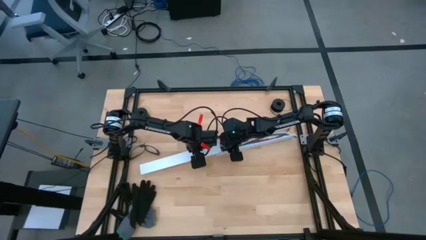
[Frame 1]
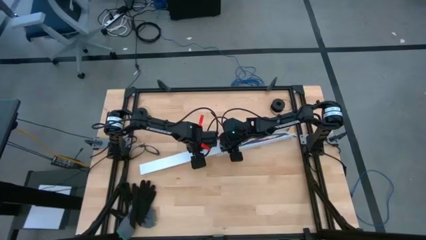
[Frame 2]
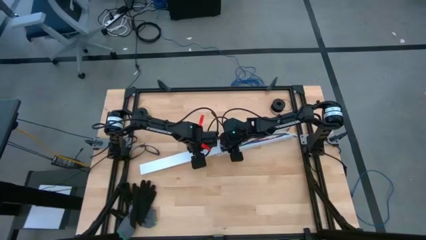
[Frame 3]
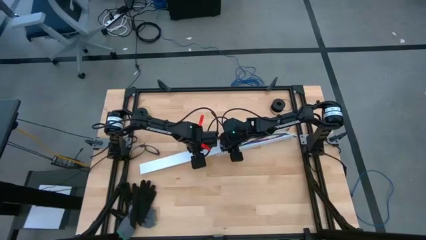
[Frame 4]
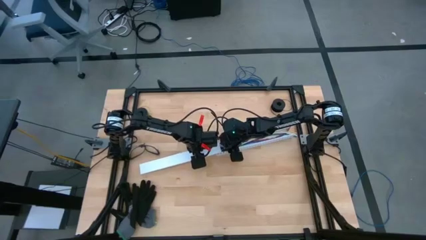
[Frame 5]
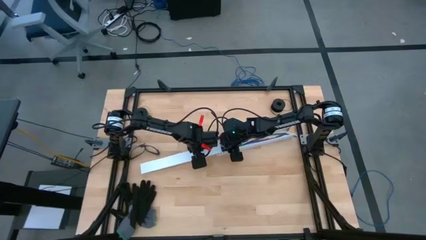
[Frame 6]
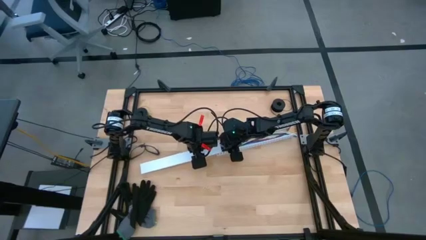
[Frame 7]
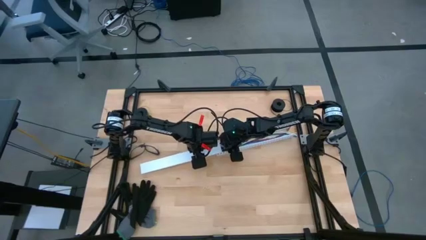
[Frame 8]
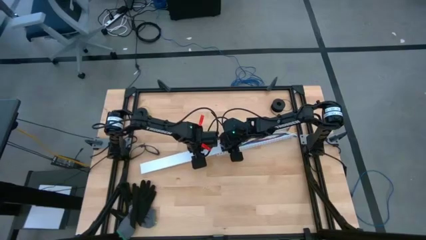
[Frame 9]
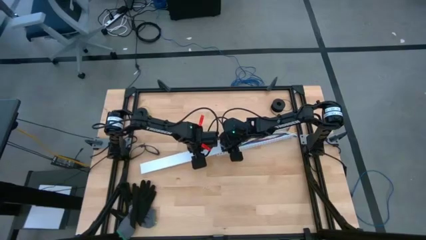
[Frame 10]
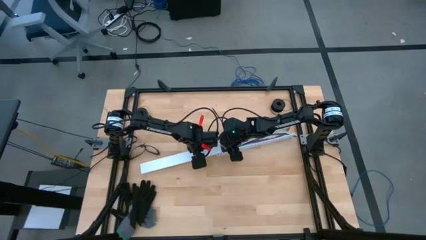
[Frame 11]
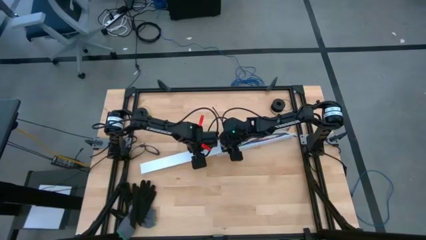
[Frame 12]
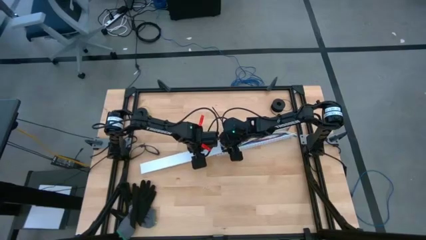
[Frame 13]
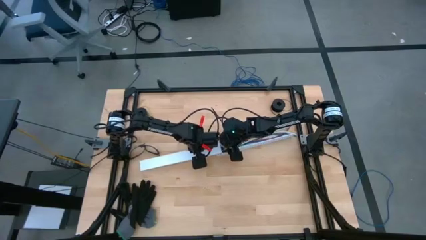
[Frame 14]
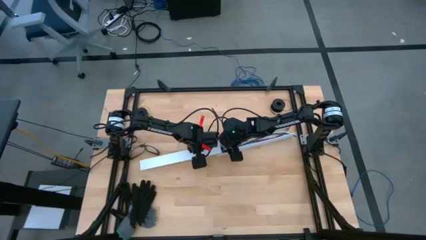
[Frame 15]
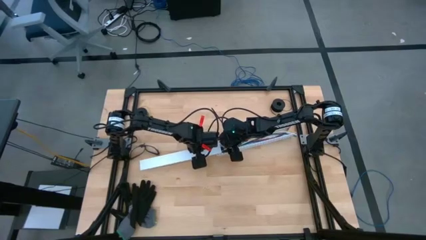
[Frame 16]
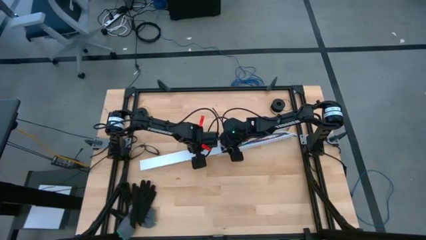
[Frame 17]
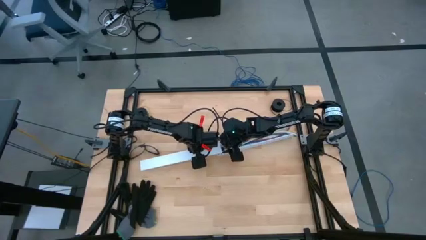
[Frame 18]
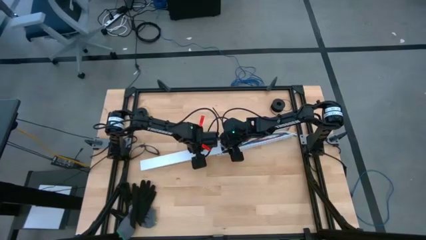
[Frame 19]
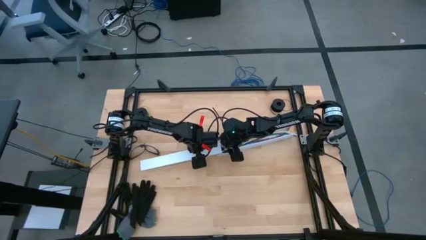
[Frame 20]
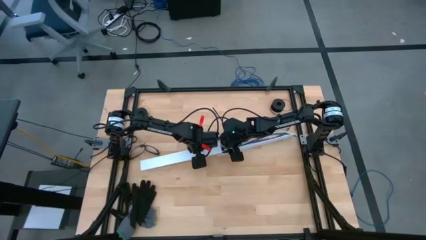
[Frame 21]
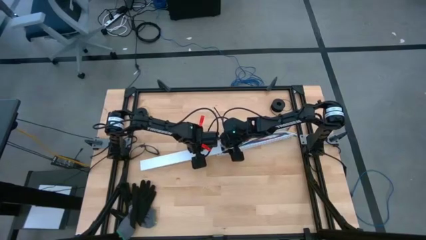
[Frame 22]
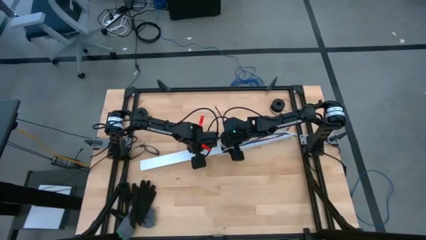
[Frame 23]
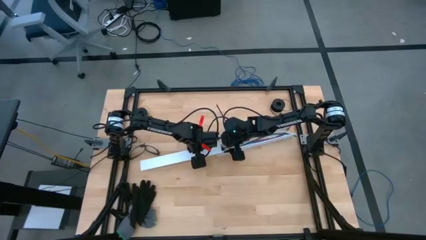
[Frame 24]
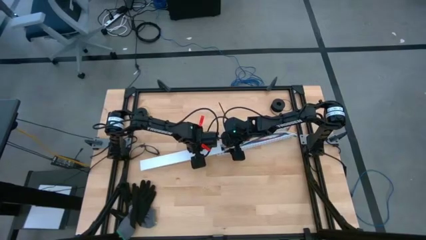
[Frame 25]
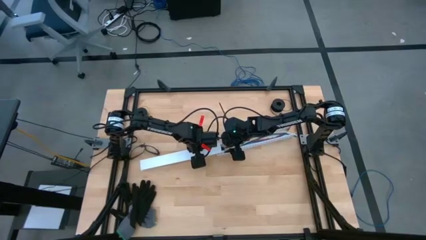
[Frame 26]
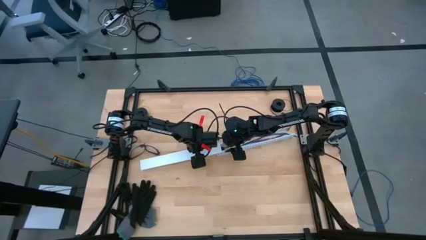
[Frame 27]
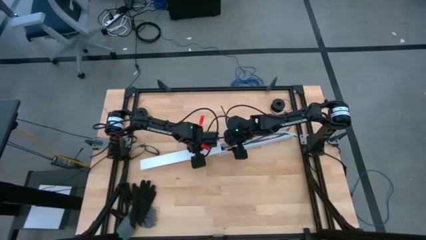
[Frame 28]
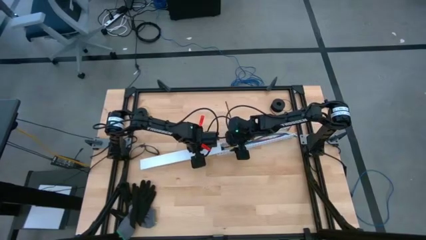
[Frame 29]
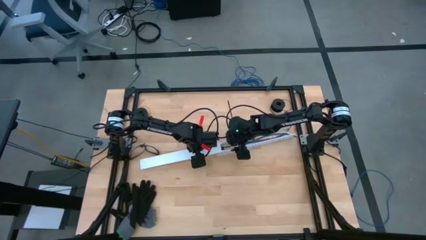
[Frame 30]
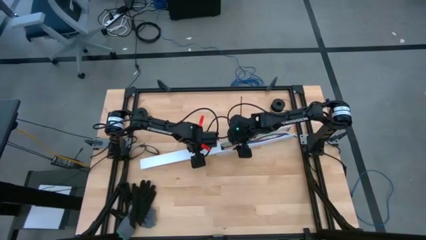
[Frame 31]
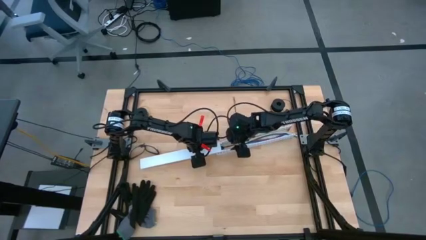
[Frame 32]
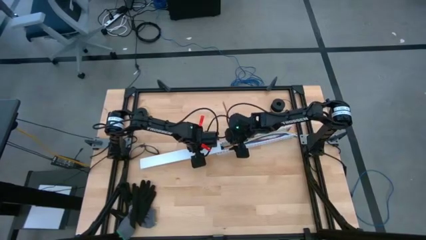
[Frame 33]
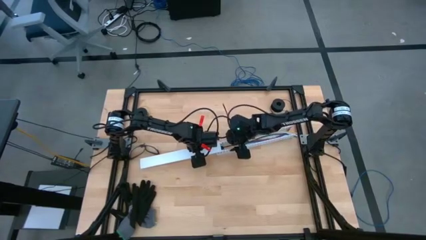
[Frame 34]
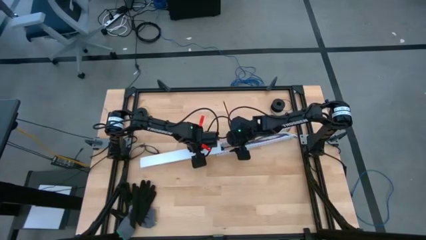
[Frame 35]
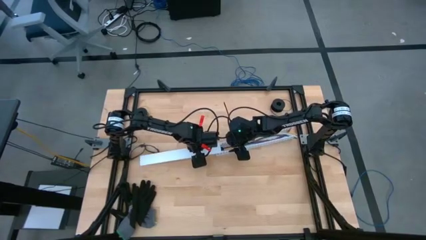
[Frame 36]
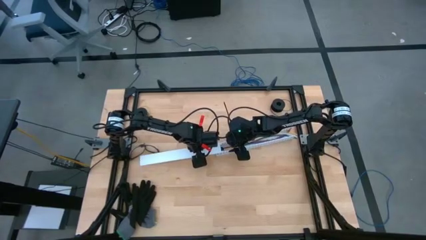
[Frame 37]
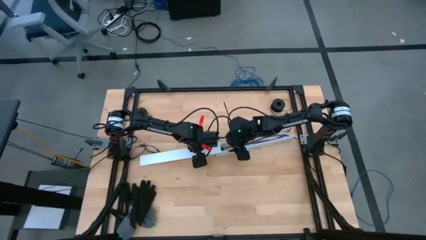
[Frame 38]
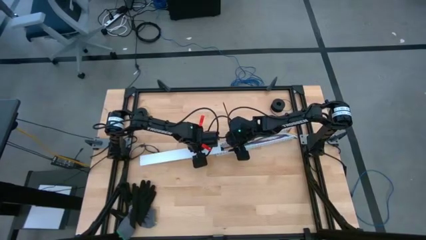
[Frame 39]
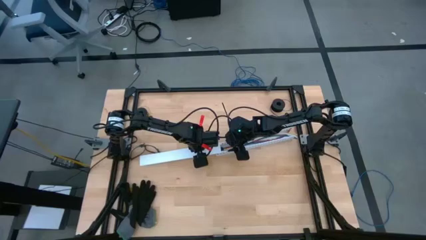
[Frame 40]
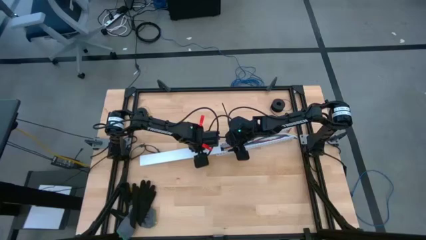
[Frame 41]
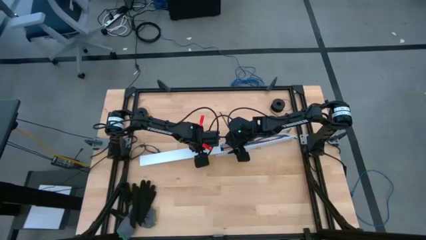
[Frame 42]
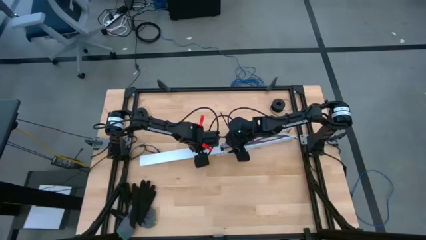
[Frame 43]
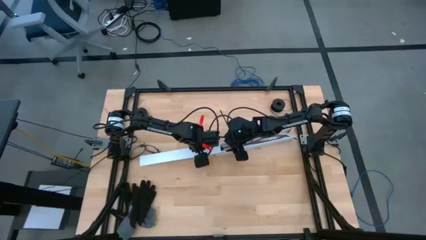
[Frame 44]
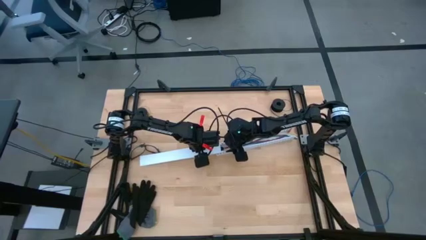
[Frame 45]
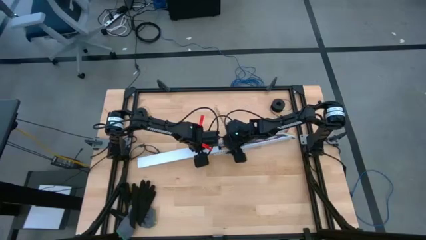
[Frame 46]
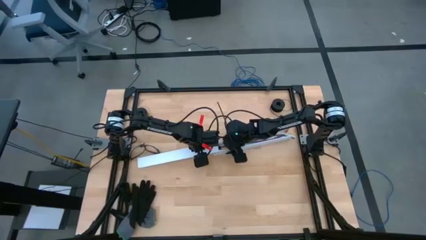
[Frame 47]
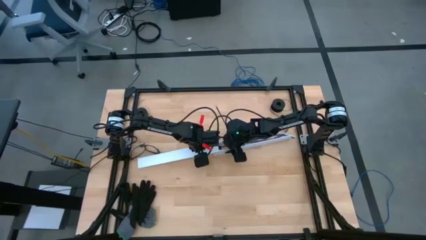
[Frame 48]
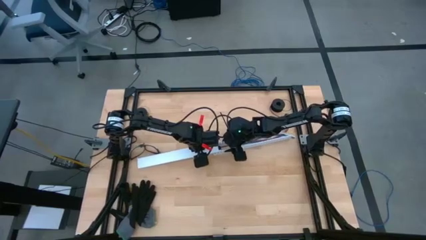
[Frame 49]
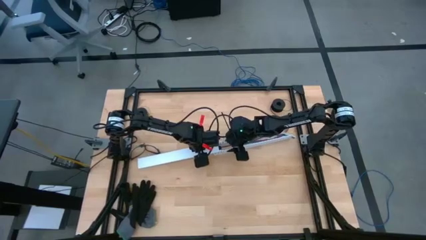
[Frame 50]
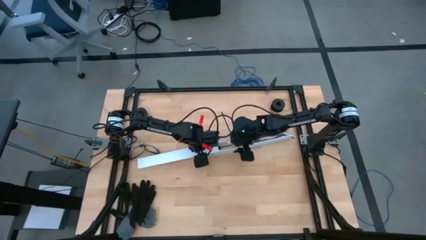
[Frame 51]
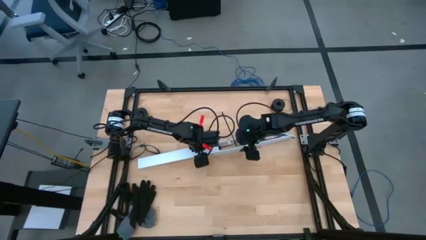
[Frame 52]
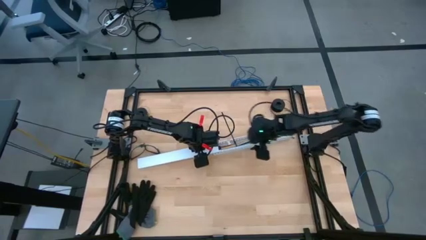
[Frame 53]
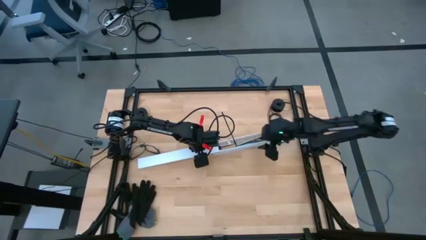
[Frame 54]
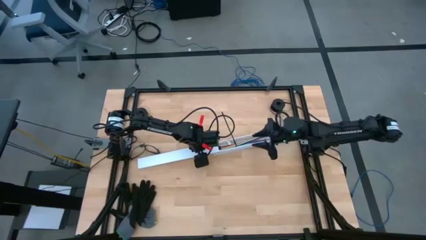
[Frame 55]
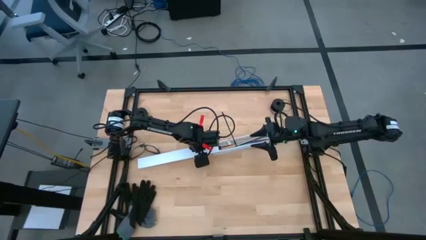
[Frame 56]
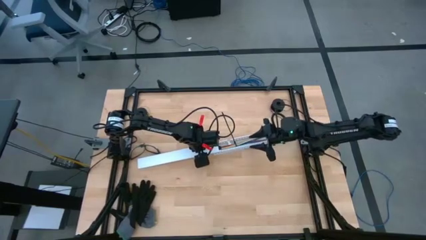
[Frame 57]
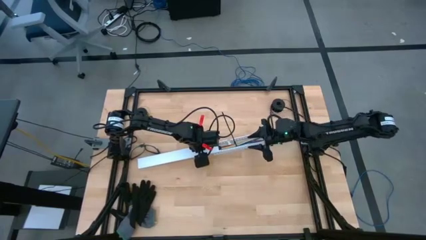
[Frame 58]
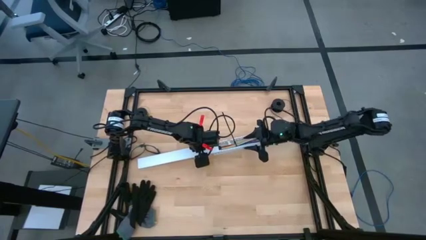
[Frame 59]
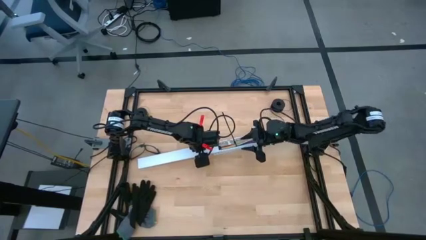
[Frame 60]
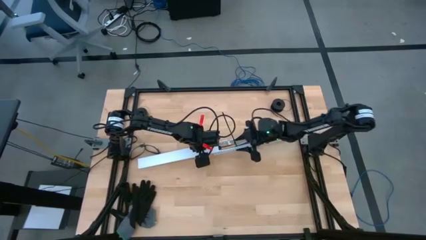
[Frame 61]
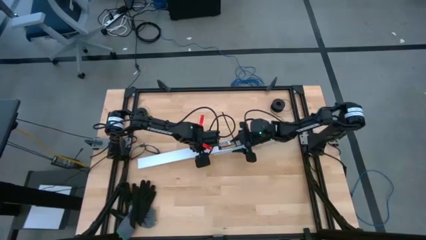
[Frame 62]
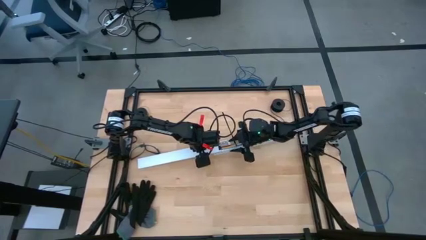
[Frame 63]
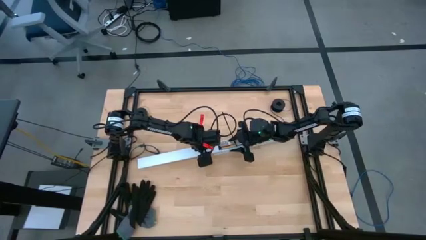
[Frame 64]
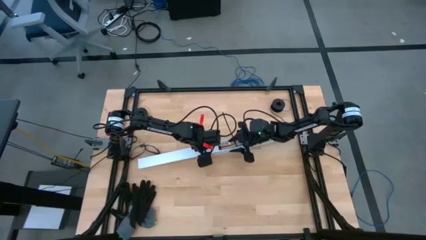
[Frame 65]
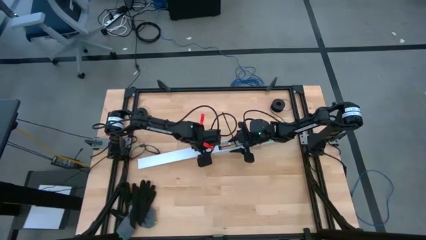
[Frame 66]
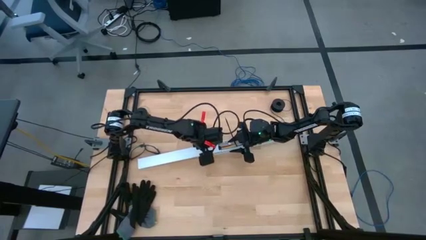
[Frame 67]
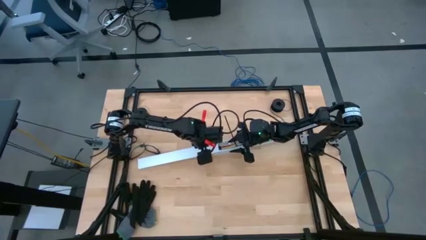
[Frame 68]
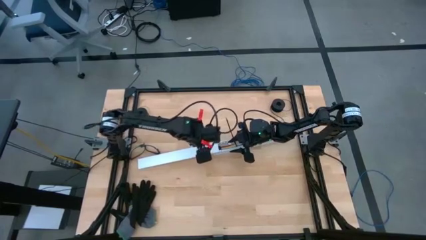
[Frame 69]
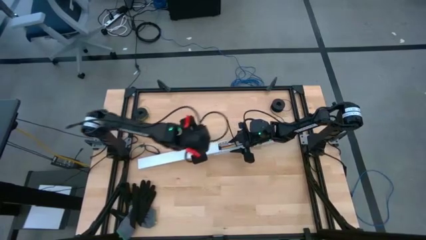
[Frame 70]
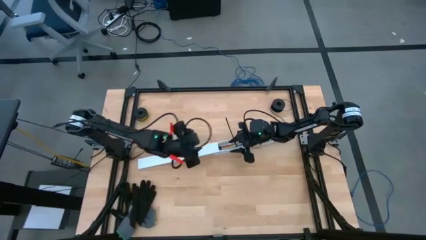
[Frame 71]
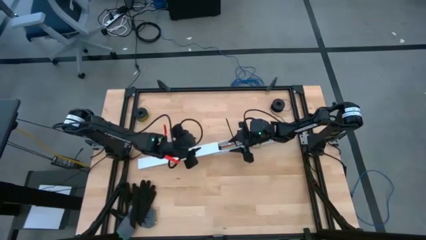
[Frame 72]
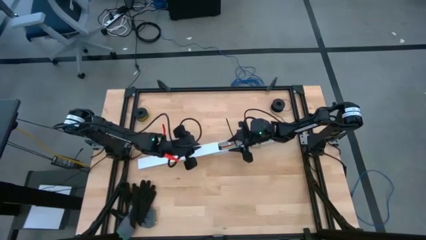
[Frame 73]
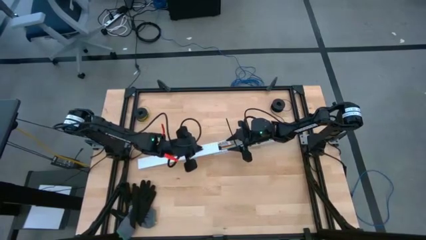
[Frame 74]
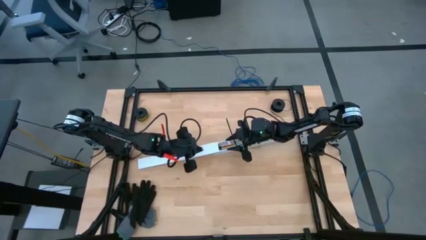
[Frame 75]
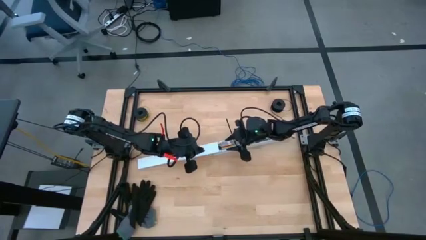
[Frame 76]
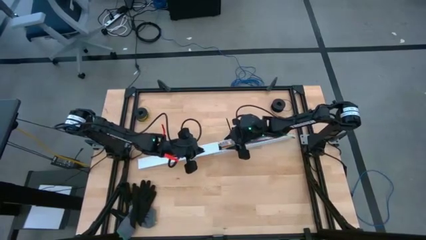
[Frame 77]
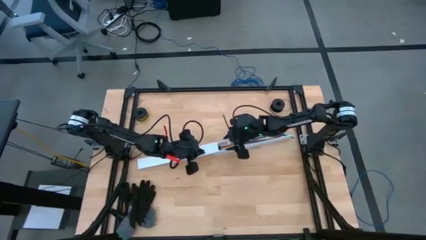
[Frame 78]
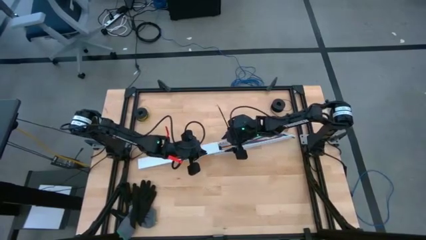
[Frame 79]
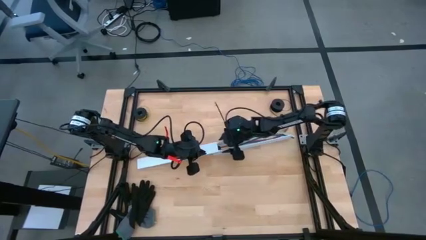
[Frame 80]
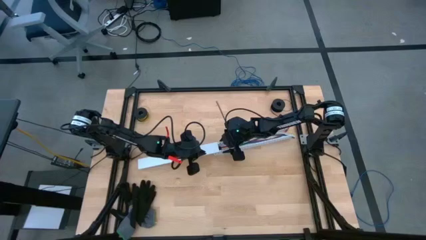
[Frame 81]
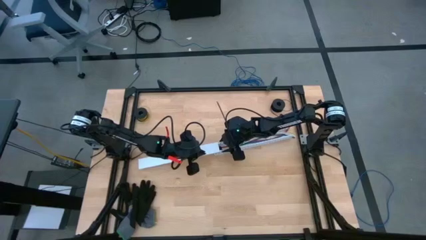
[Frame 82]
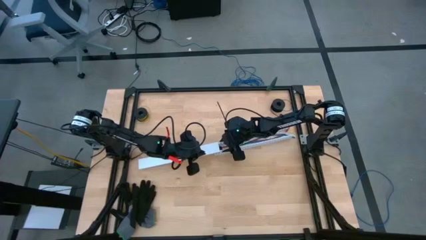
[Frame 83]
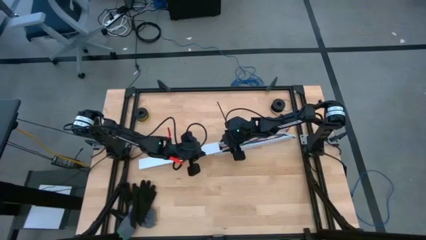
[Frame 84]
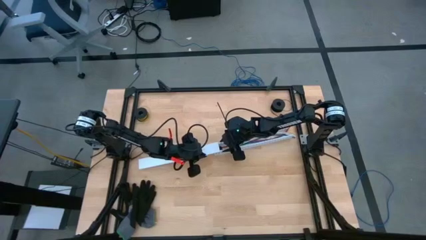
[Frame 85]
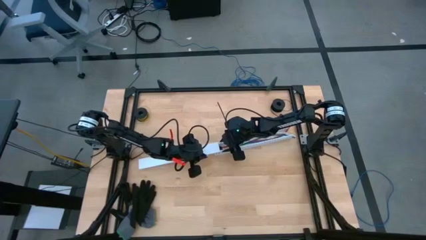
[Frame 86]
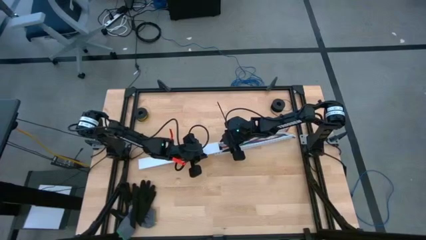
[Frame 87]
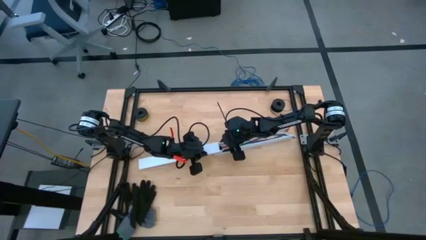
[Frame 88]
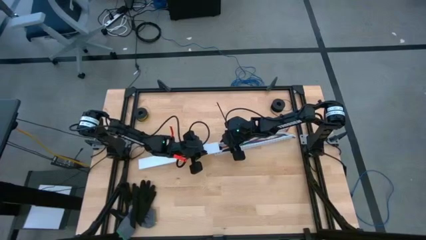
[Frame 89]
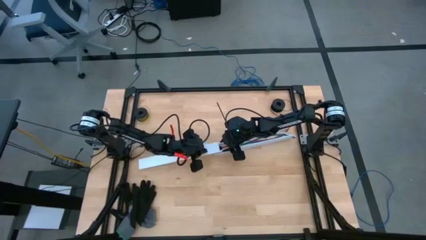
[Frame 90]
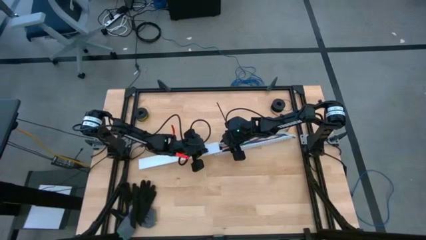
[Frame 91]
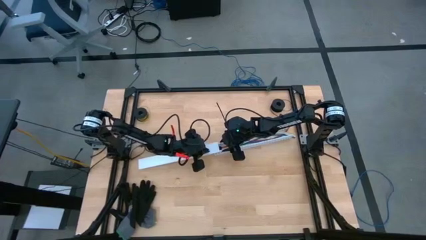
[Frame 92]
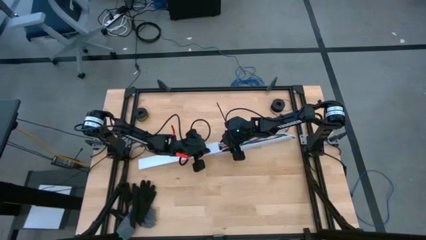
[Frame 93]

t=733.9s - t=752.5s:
Task: Ziptie cables
Close the white cable duct
